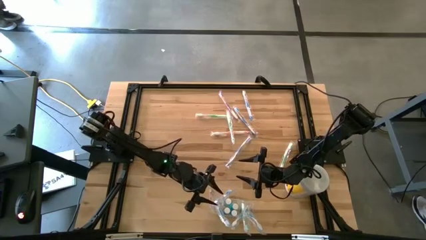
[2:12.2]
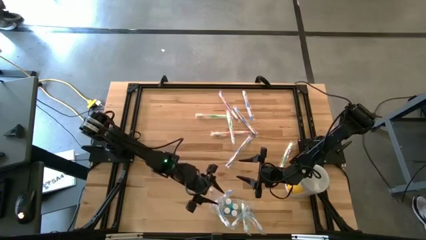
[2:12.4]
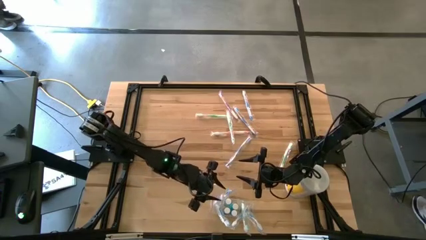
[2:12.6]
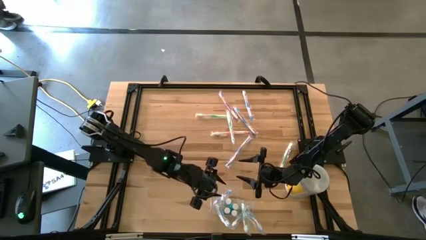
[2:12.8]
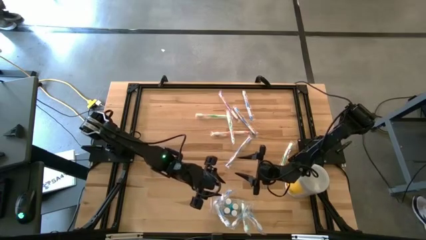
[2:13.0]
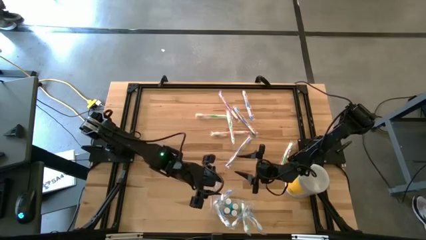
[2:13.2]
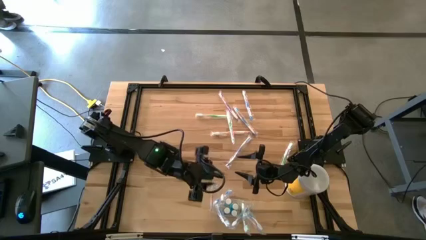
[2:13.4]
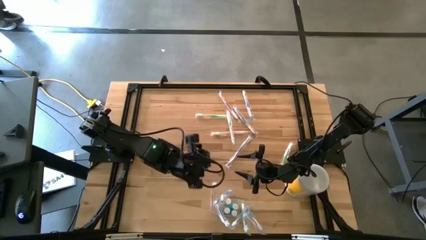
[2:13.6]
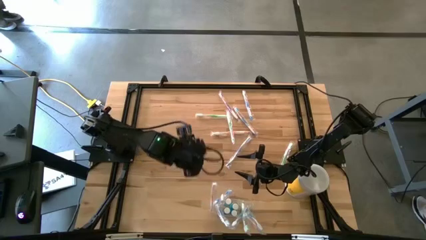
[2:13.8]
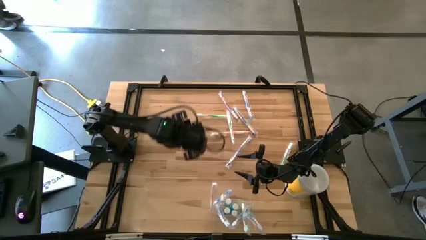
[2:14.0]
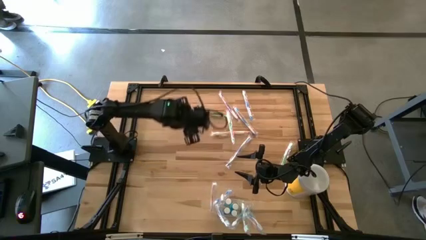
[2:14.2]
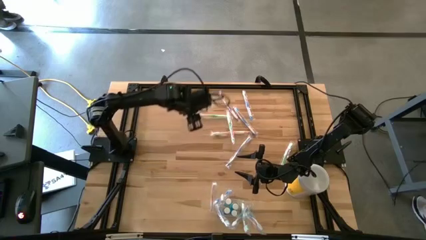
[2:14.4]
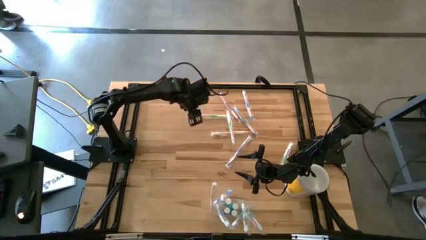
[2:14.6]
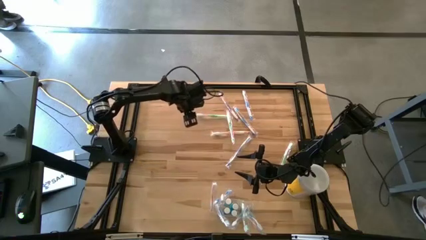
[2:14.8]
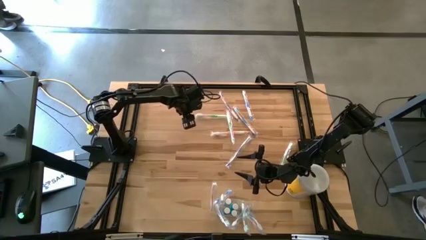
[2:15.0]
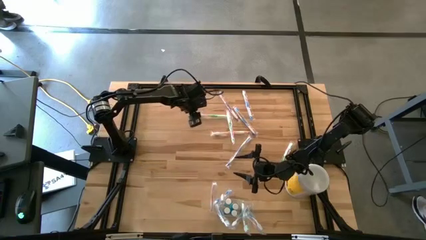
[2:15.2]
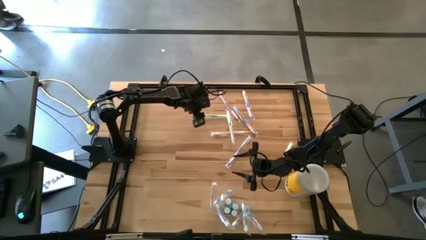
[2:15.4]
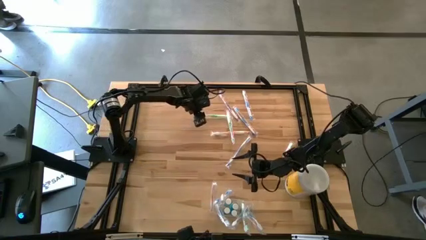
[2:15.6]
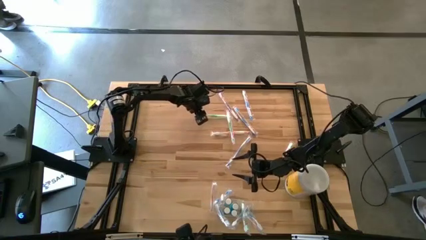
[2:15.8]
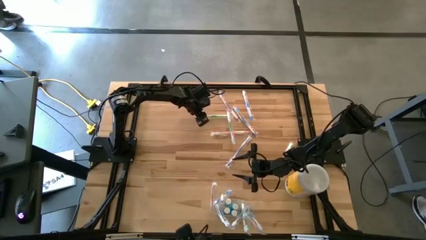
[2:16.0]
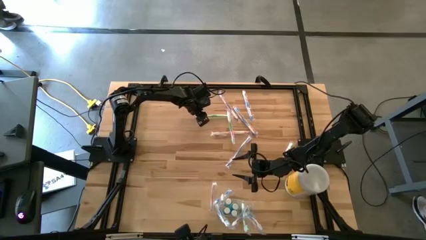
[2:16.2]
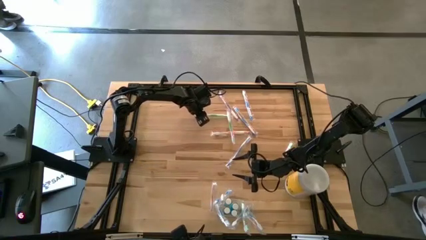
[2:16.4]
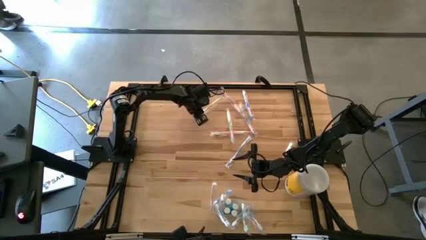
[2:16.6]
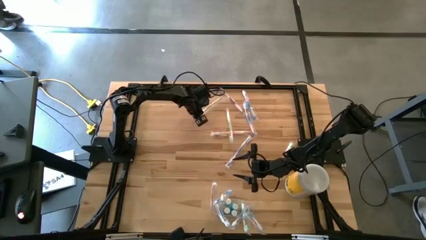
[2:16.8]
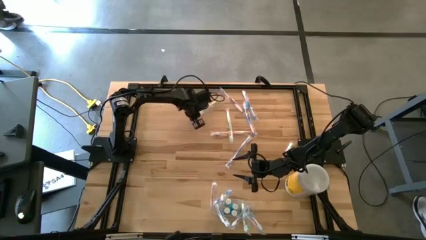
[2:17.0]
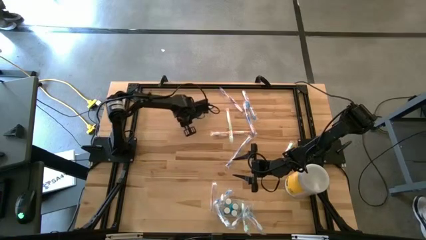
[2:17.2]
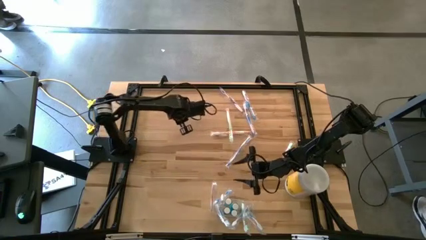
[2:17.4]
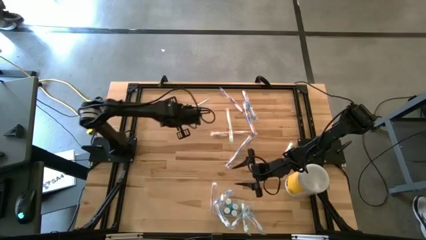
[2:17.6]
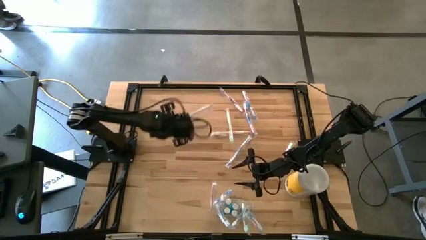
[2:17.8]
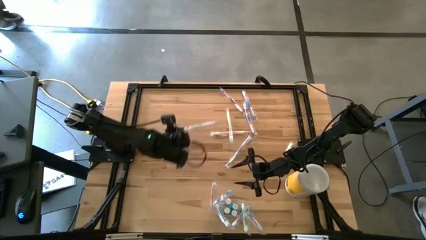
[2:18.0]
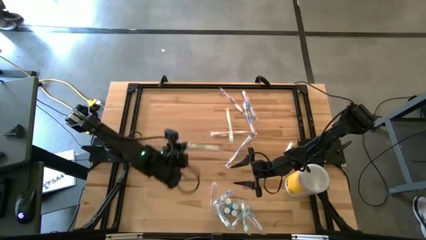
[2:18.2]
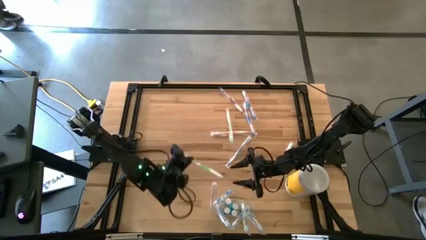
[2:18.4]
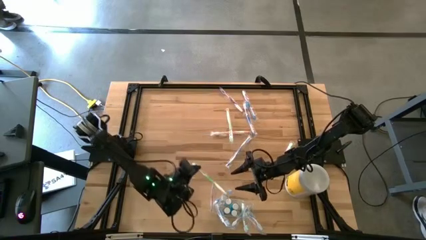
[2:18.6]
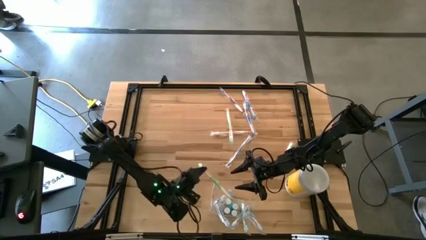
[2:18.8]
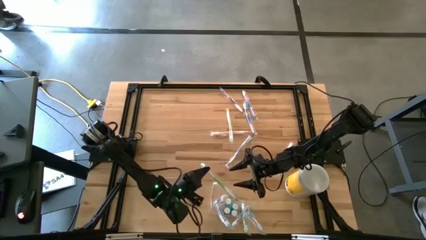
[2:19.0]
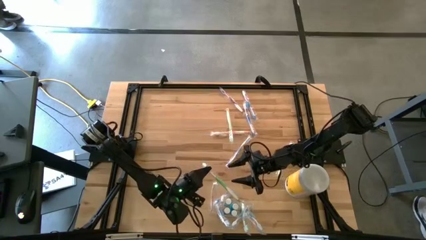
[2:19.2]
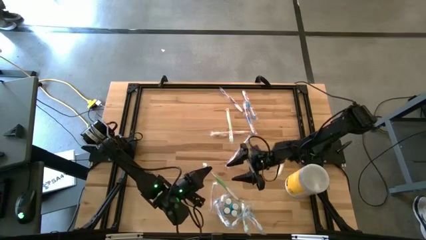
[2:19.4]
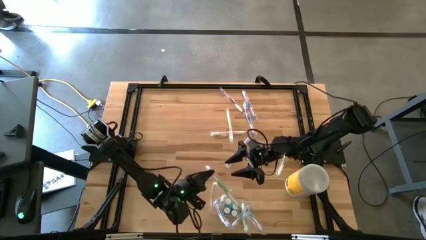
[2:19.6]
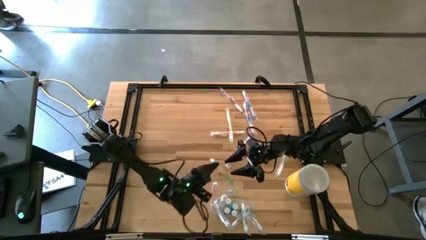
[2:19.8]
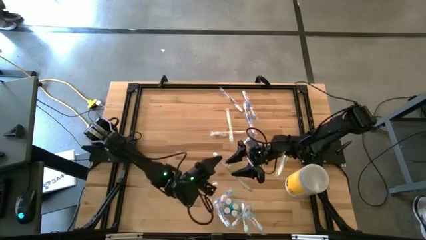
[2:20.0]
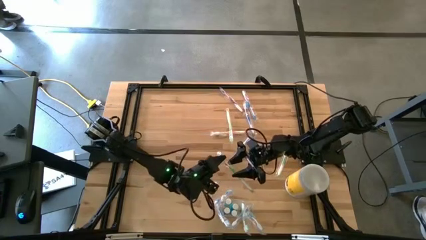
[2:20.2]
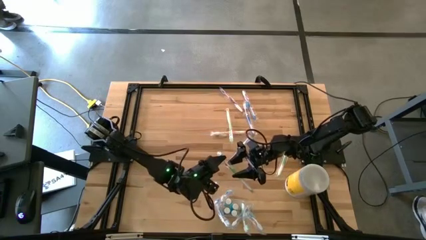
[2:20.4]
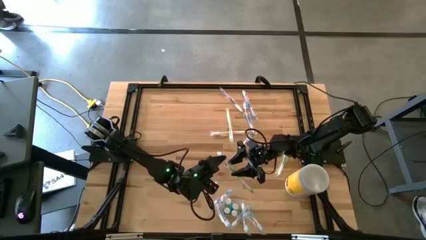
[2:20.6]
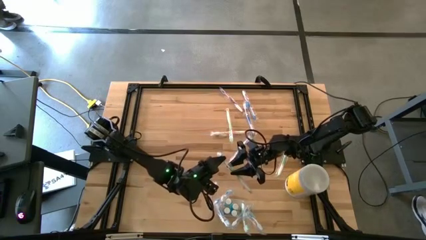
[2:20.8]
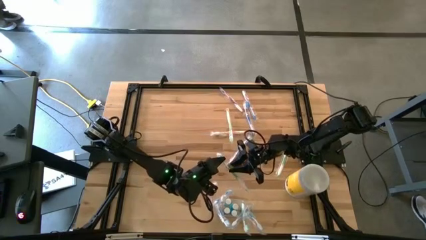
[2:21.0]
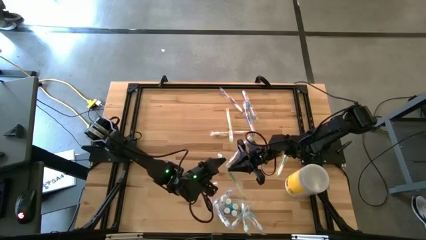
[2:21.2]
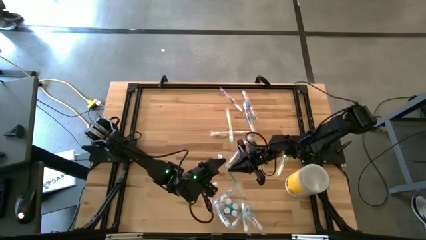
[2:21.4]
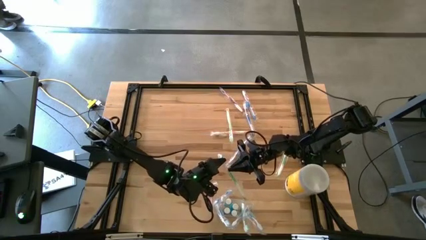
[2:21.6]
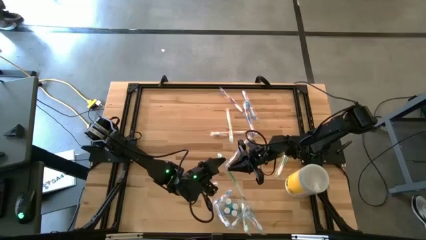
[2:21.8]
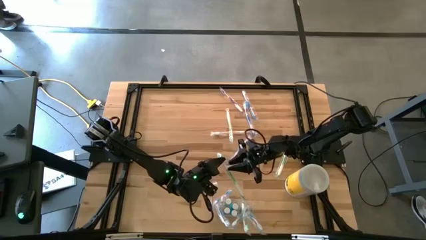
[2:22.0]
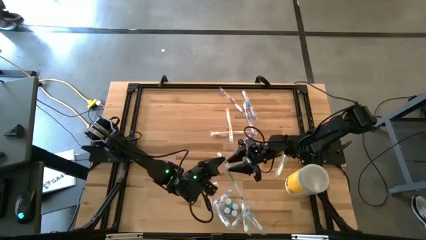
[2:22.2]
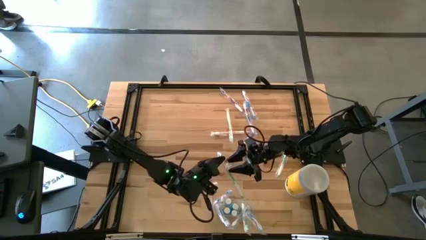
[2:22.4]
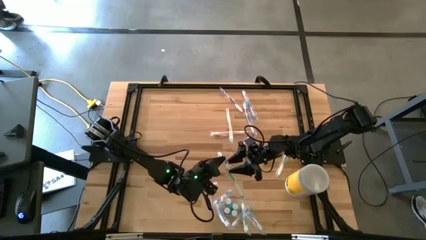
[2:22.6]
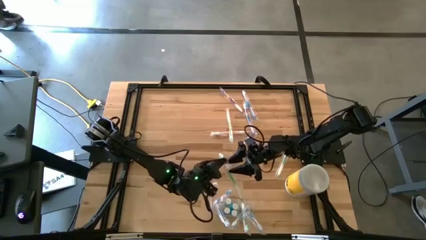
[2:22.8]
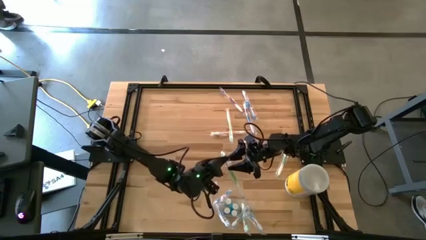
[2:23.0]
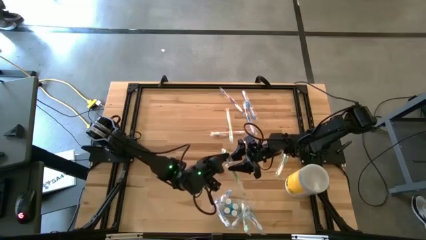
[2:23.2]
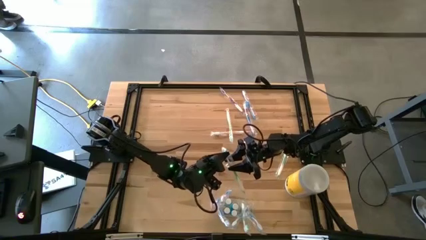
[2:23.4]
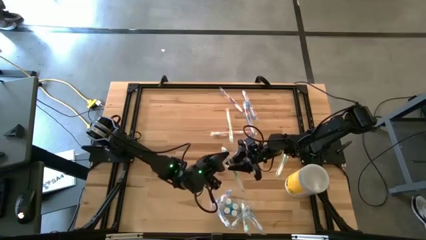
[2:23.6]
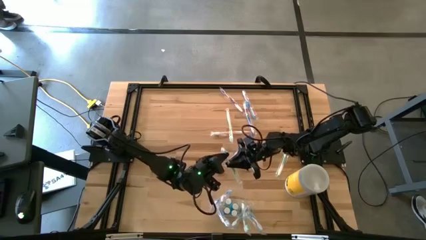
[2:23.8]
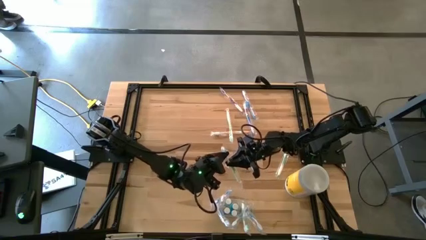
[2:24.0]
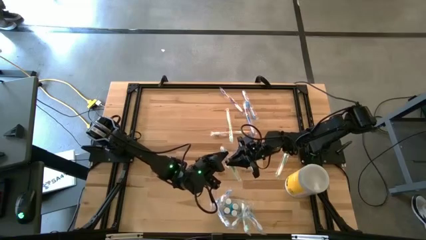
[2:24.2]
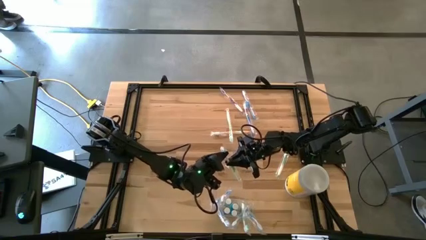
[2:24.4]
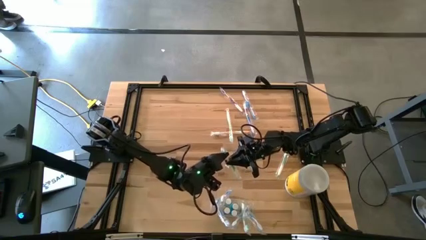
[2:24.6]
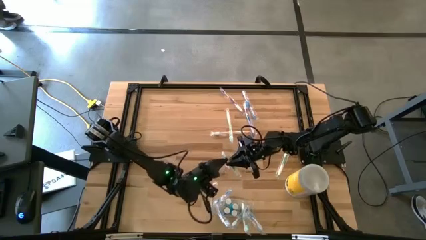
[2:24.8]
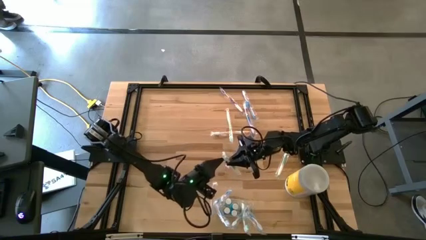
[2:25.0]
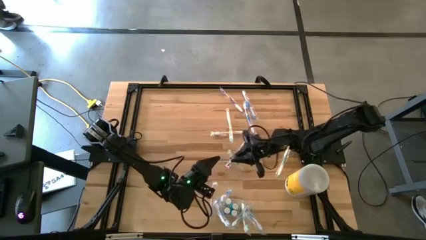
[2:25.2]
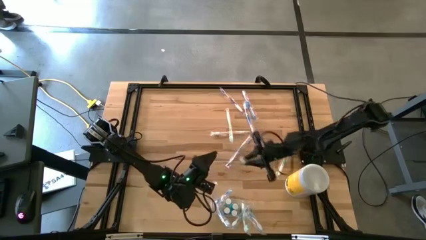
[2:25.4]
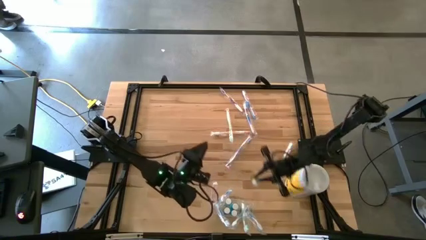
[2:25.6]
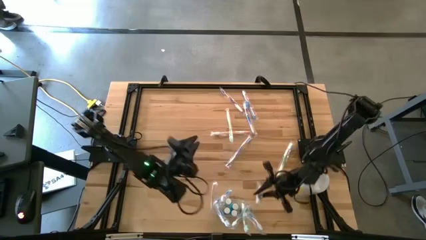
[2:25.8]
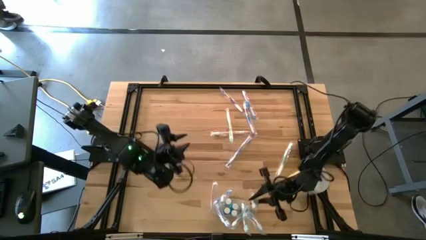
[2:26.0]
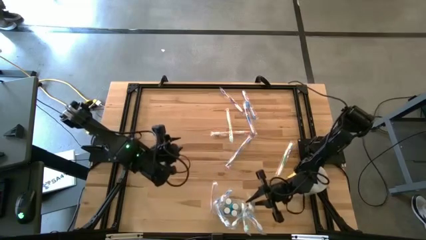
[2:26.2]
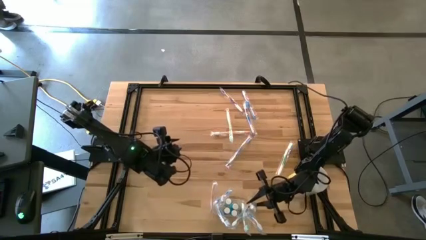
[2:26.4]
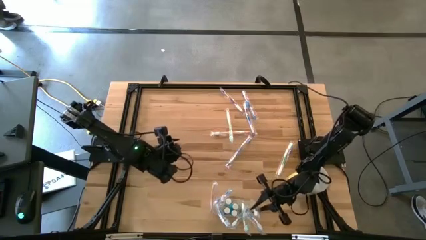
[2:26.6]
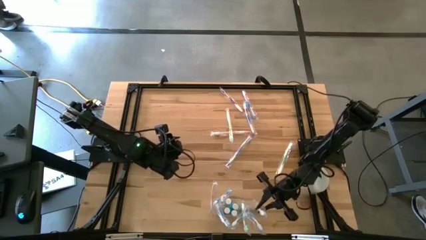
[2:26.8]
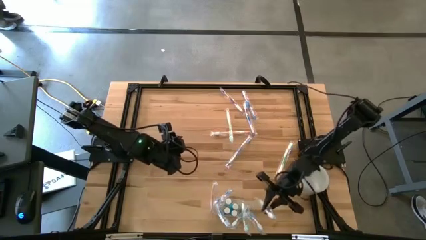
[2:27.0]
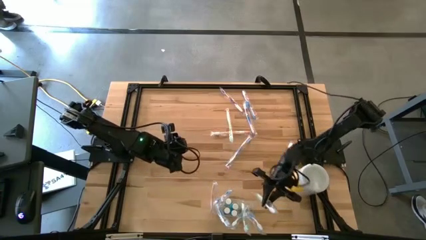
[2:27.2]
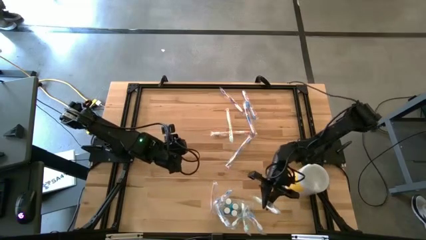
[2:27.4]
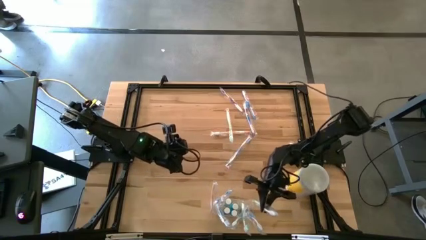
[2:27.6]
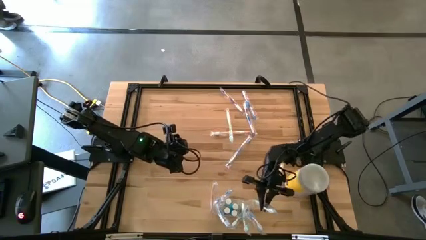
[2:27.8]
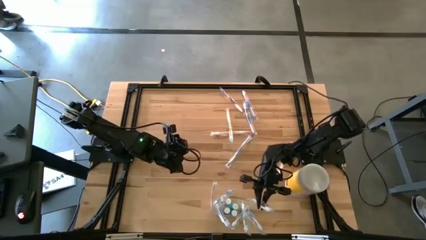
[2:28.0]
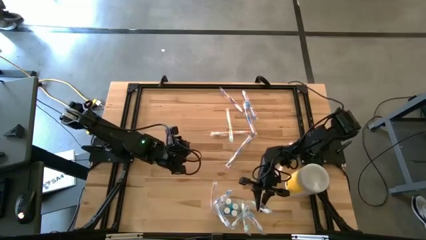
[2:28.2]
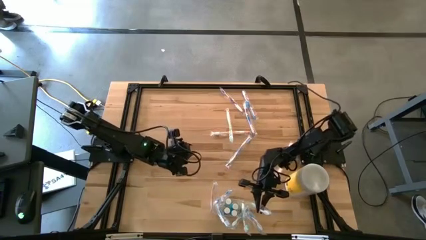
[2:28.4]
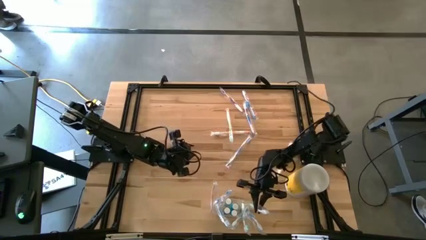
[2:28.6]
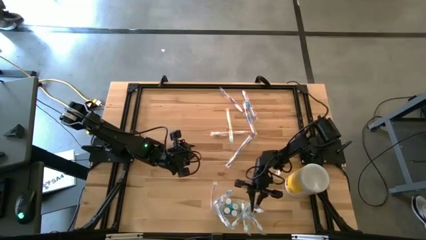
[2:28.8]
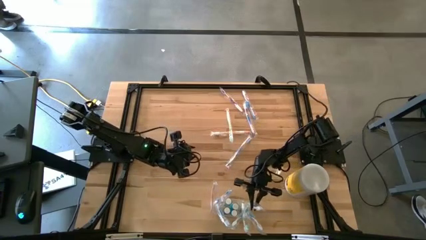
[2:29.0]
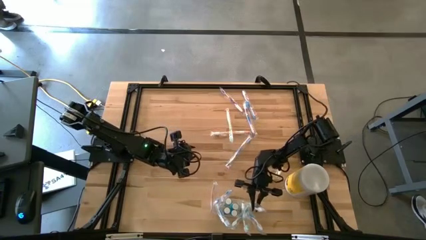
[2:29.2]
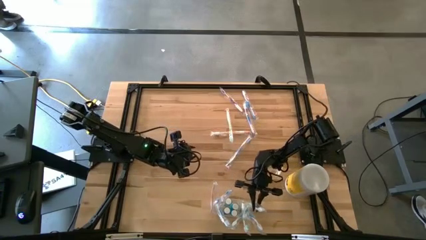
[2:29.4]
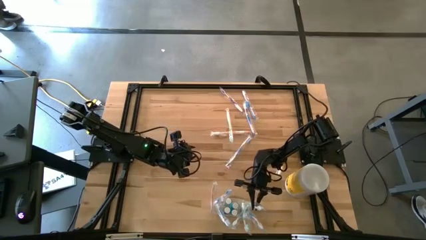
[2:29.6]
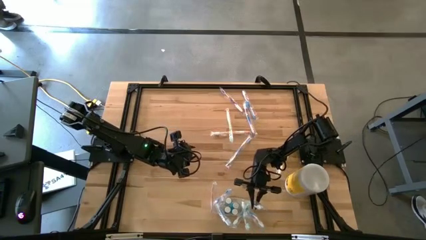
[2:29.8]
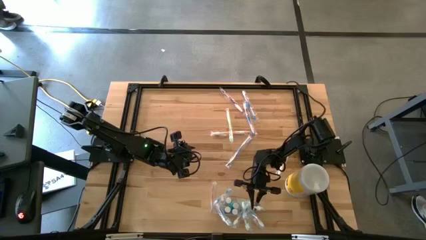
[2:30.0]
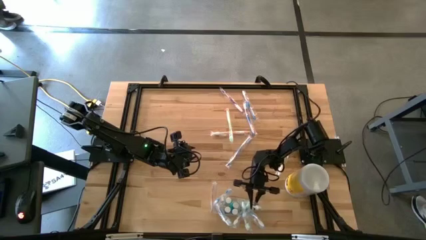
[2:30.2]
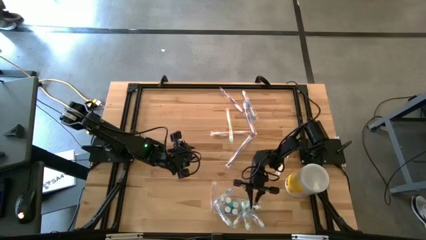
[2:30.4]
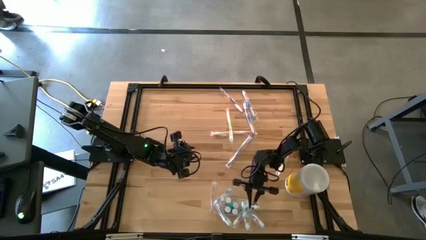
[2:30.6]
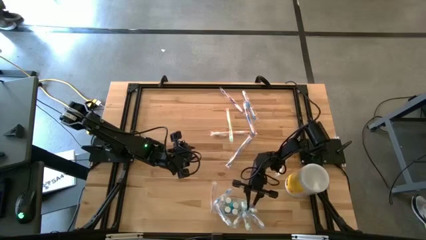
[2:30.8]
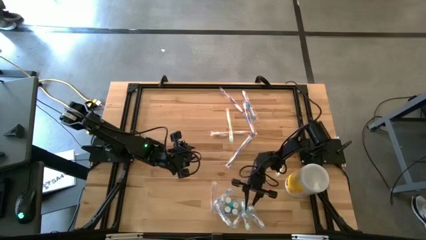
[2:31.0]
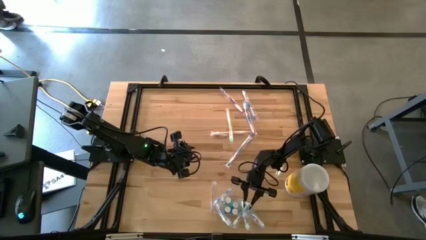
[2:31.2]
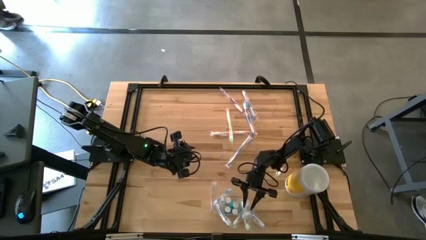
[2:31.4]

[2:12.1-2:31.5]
Task: Pick & Place toothbrushing station
Put the green toothbrush into the transparent organizer
